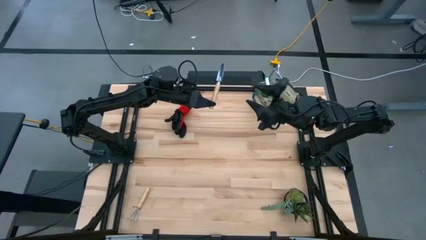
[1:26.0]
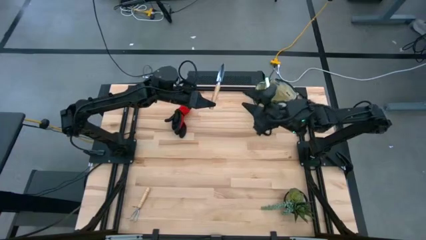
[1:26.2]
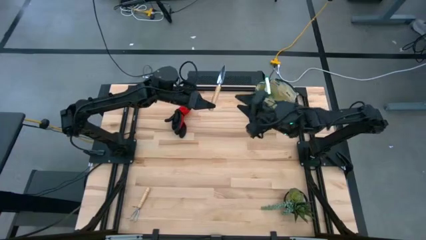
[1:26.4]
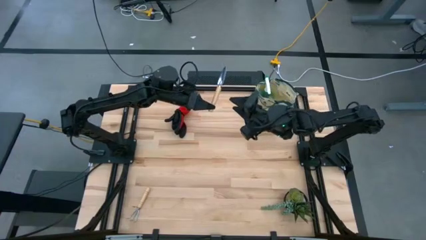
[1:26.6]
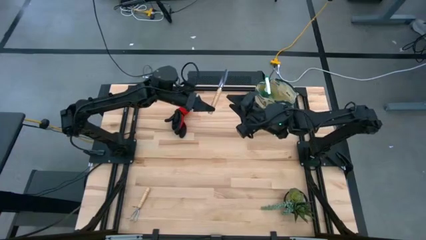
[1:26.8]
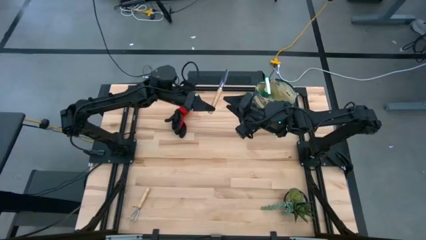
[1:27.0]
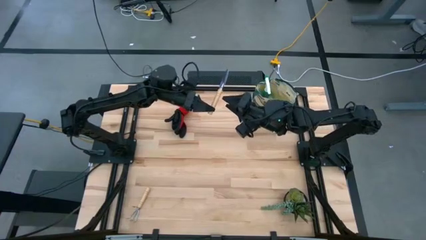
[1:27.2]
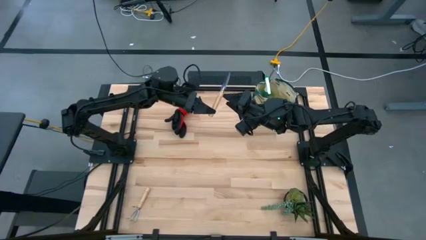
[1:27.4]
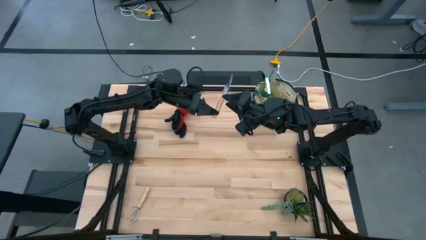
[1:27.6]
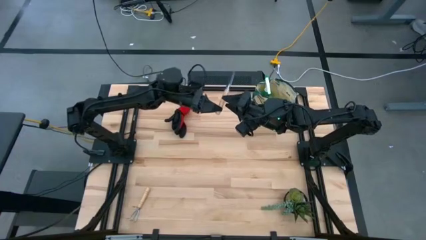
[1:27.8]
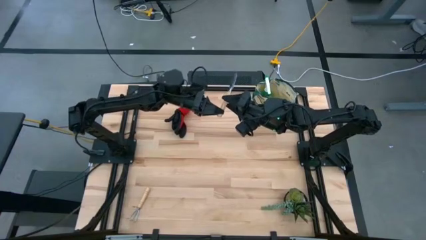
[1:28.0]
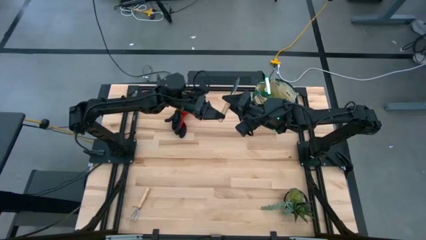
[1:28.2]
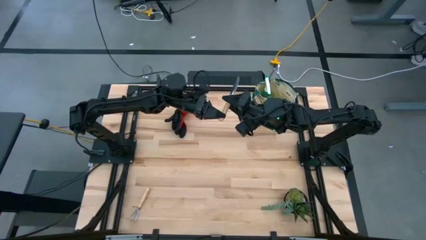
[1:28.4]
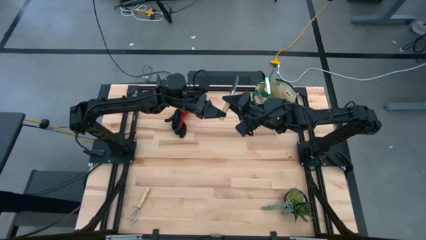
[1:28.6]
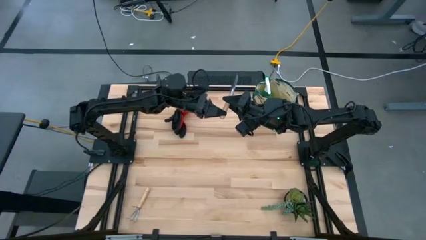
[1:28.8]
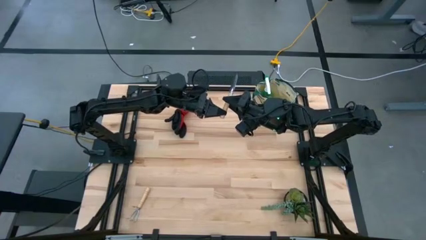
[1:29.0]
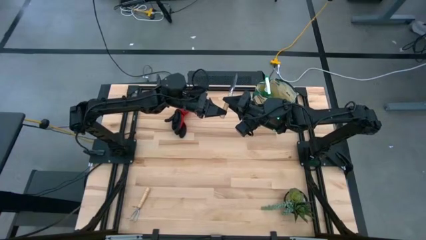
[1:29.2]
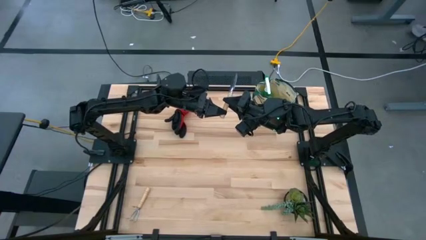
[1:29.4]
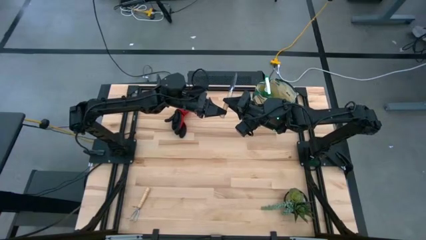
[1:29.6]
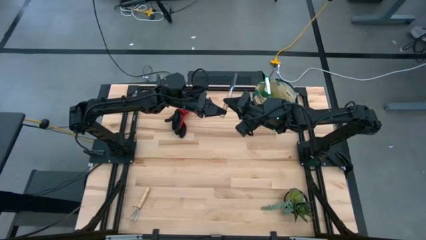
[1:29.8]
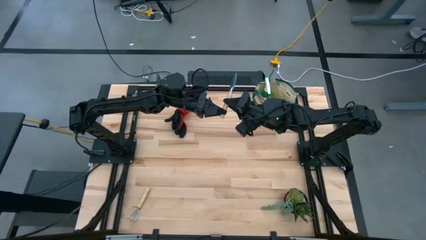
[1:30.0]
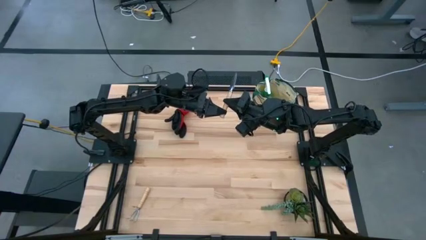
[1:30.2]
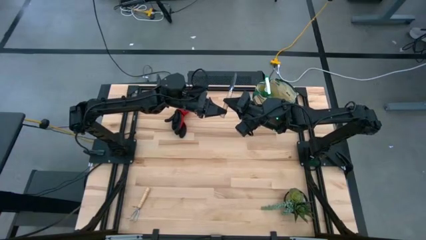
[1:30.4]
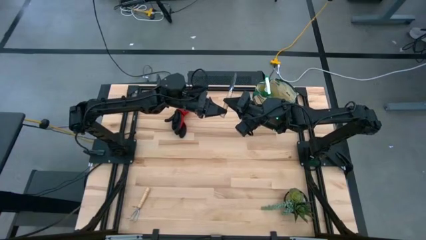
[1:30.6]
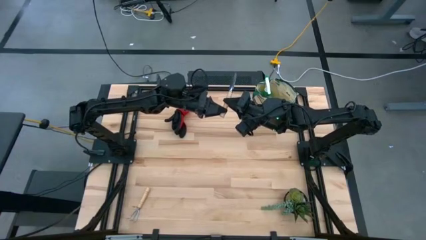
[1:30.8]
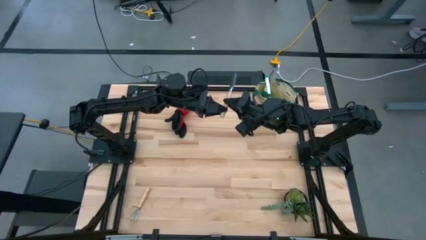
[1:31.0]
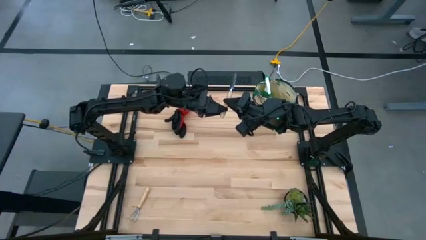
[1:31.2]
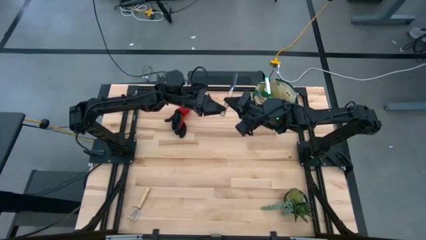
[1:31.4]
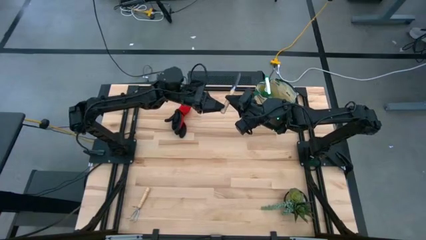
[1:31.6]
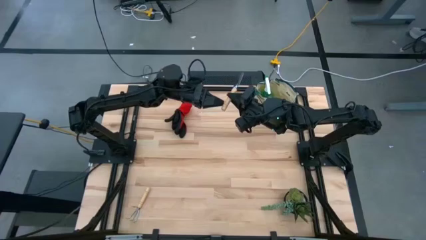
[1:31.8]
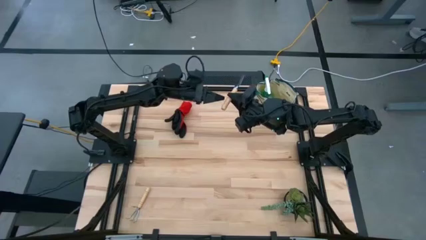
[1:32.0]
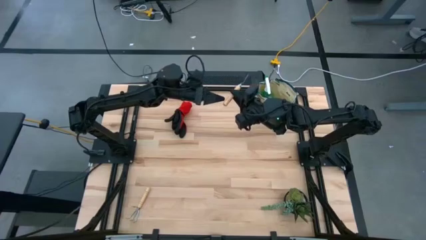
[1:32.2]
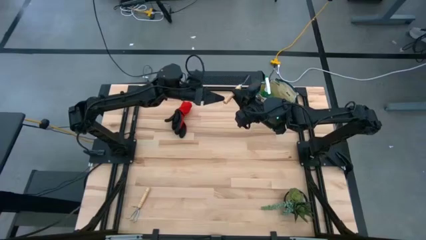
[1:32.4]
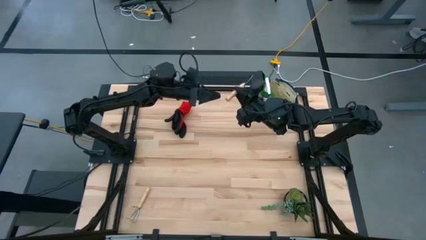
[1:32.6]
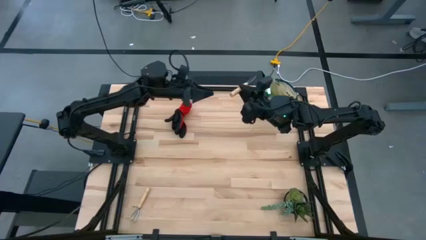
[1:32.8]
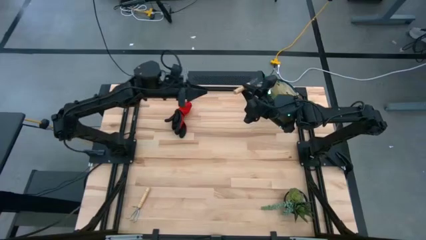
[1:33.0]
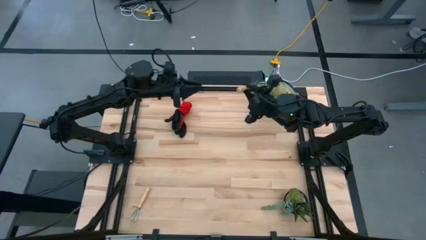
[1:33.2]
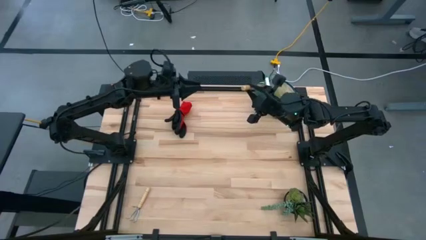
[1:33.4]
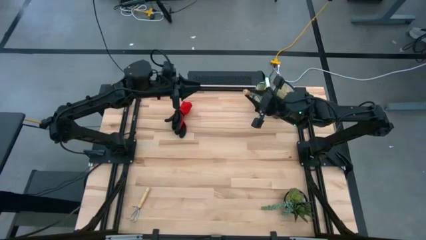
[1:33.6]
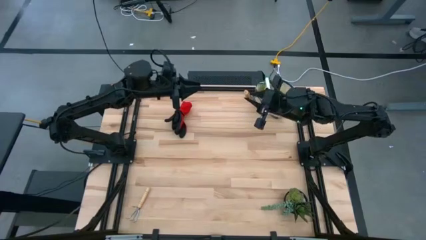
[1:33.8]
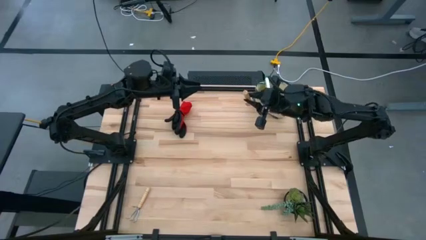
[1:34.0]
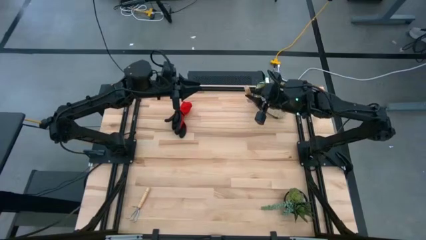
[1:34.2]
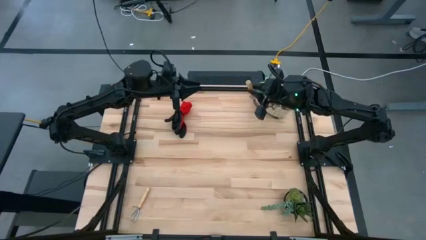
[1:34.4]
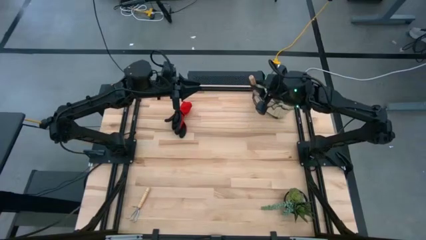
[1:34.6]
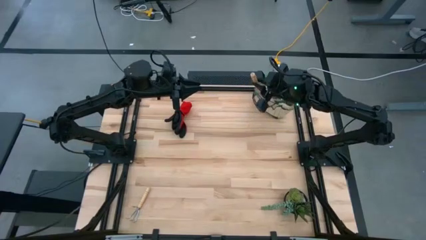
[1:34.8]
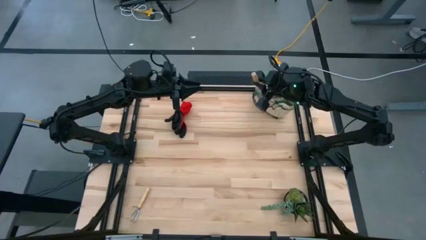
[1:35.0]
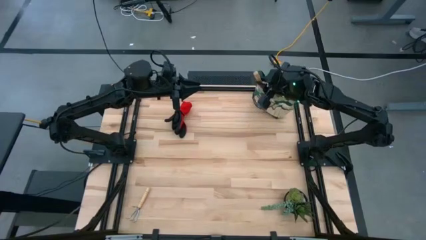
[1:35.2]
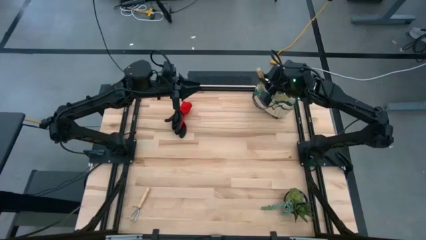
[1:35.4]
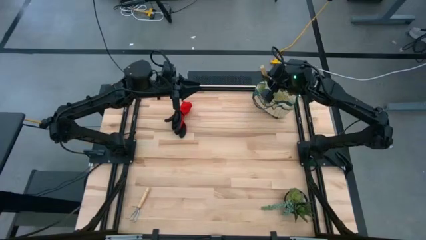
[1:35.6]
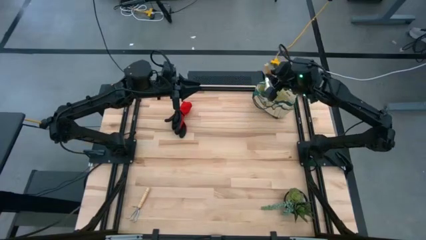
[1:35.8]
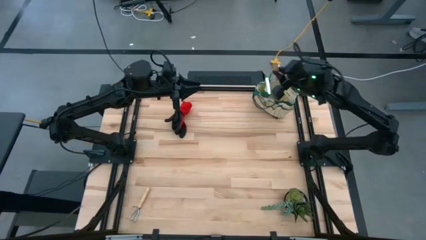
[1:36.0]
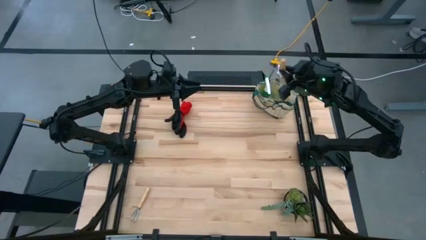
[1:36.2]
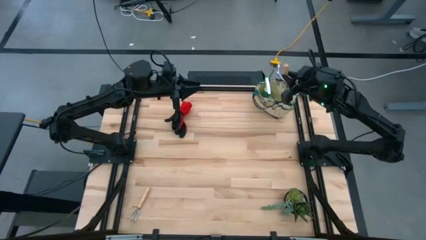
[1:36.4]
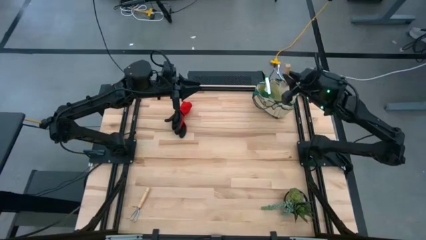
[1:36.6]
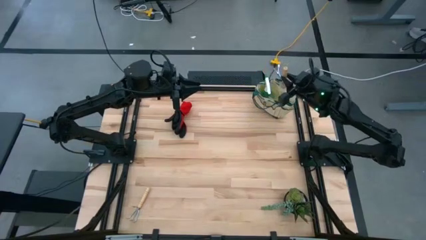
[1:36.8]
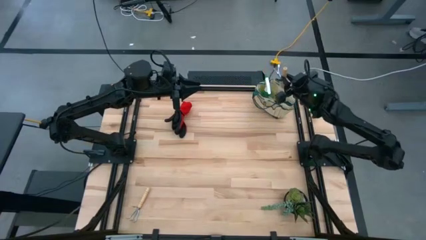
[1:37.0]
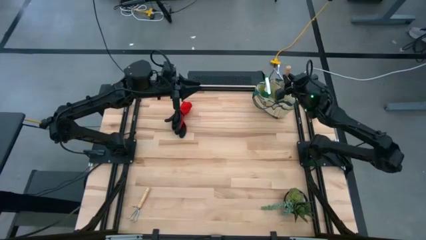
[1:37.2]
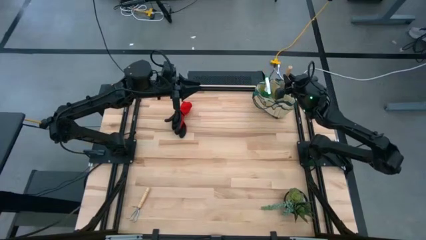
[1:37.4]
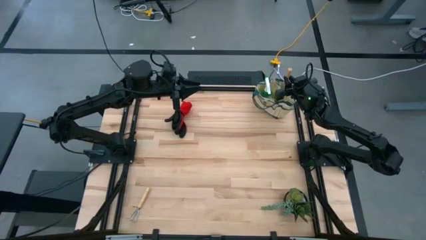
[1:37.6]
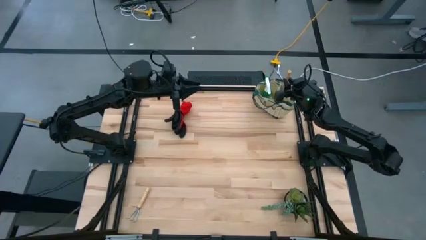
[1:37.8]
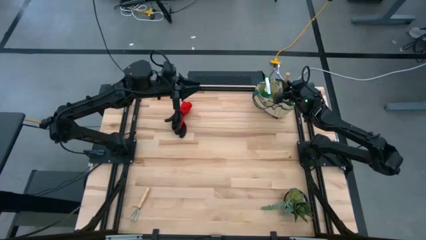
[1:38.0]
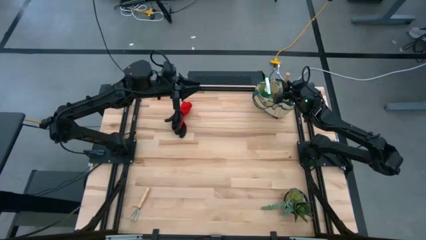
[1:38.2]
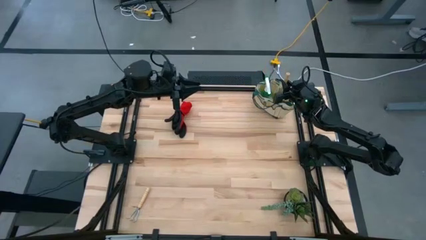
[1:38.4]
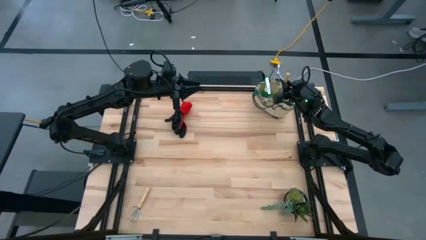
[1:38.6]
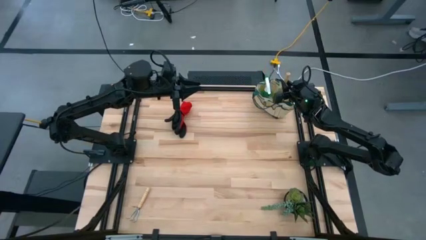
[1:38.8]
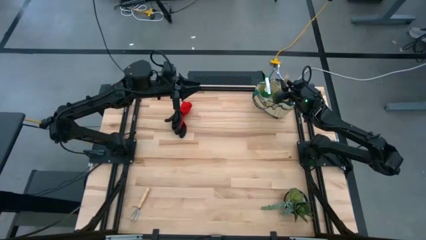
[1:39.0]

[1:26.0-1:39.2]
Task: Pick & Place Garden tools in Gardening bag
Put the brown trowel into the gardening bag

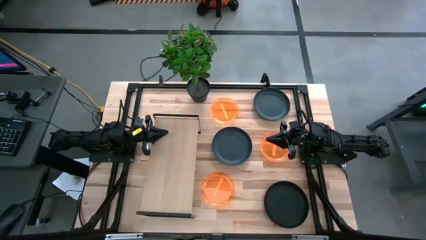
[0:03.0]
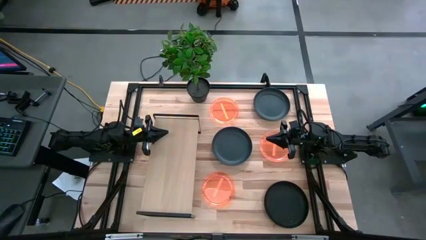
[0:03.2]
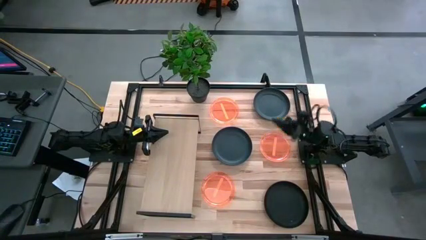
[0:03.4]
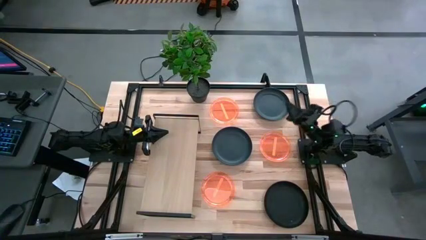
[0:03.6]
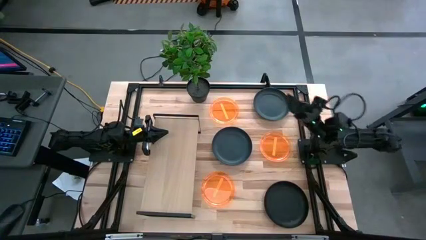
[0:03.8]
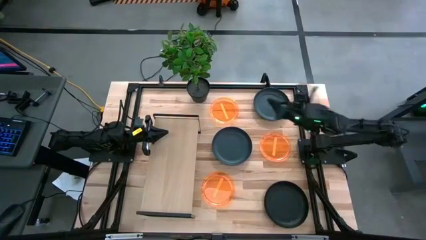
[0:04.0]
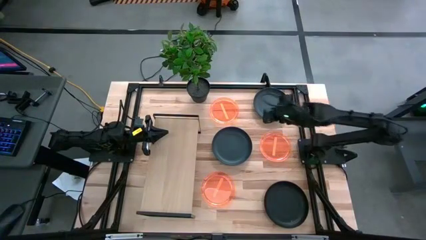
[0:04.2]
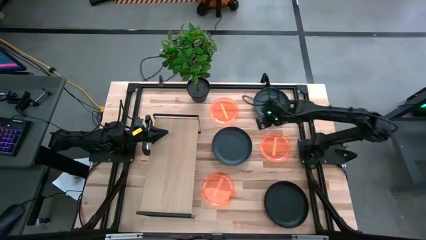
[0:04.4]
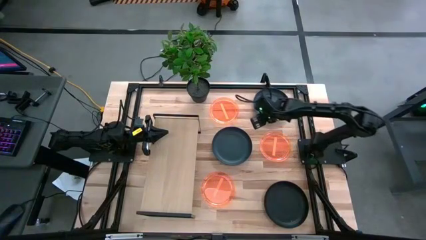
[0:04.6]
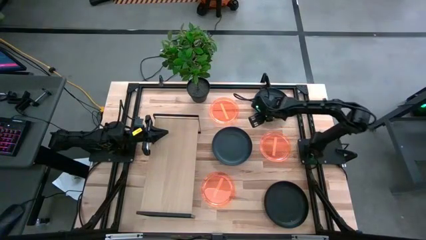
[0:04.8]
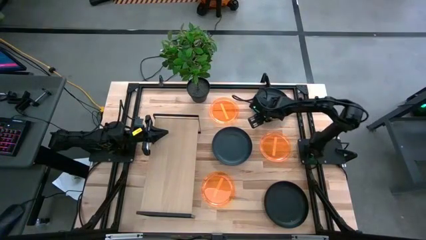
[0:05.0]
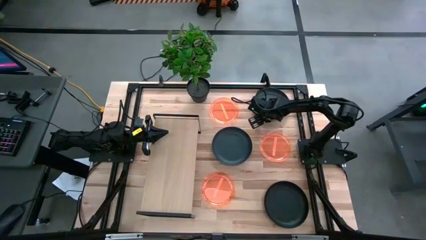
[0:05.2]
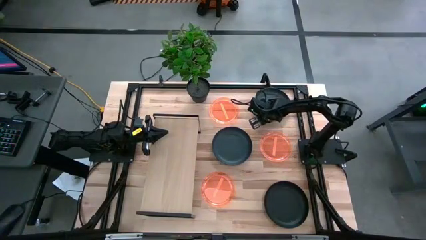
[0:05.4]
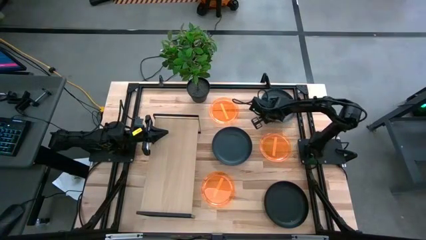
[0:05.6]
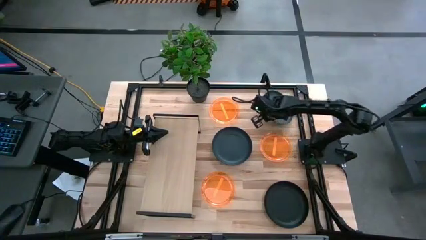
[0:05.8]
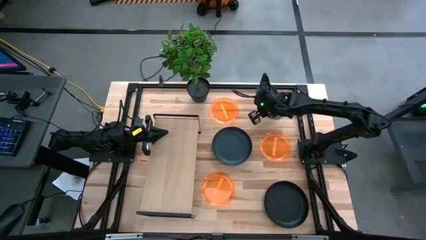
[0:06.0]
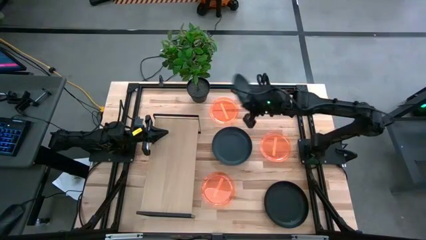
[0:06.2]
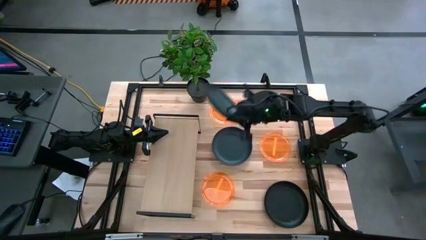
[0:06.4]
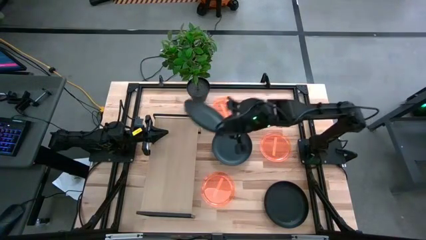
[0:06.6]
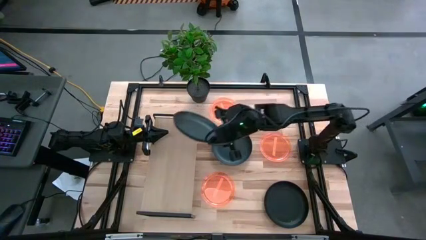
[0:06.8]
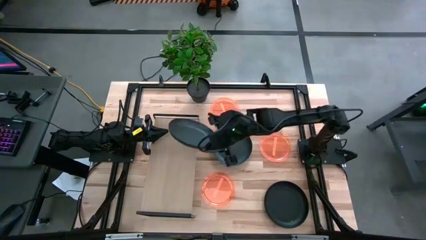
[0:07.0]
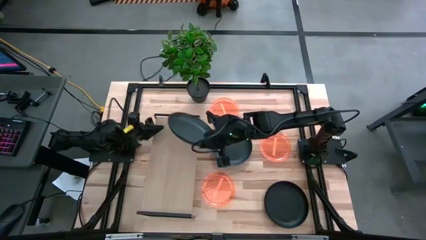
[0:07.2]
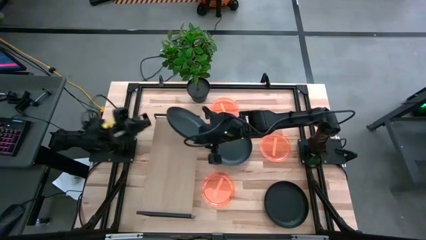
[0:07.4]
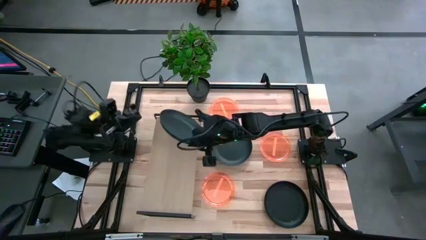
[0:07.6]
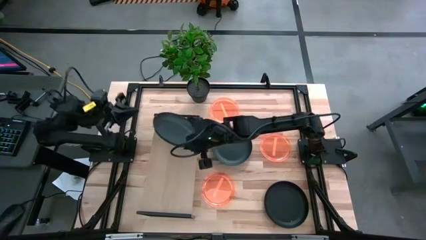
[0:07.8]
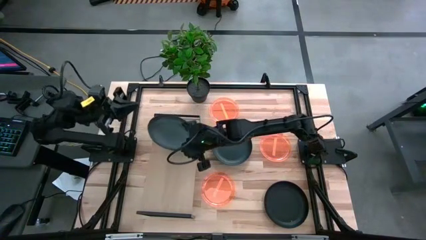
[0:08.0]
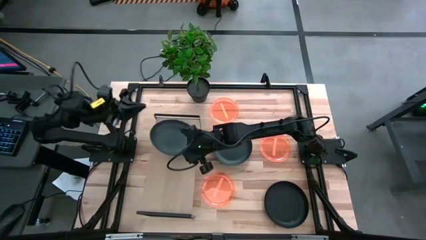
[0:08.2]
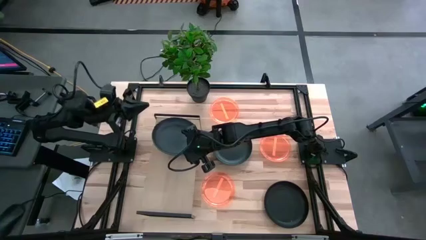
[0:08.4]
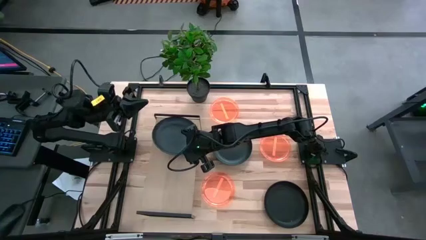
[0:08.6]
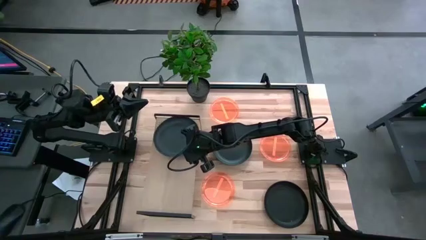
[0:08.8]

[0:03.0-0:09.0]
Task: Place and stack plates onto a shelf
Put the top black plate on the shelf
